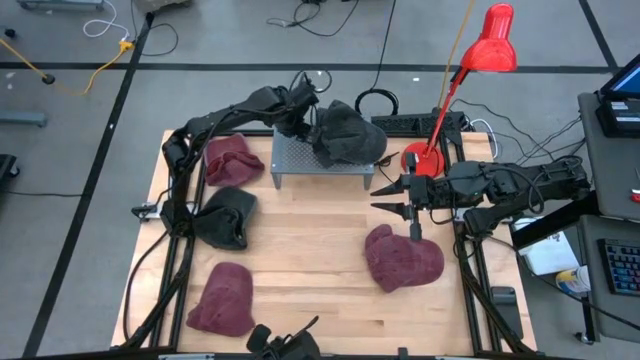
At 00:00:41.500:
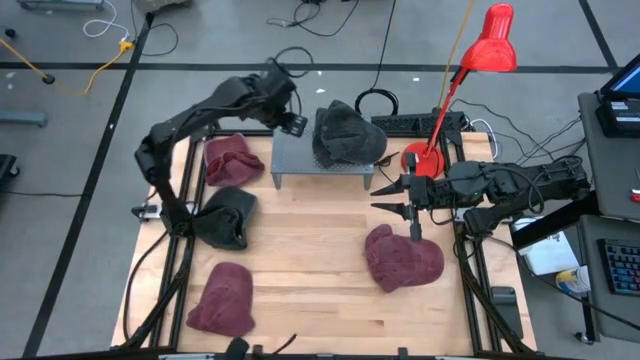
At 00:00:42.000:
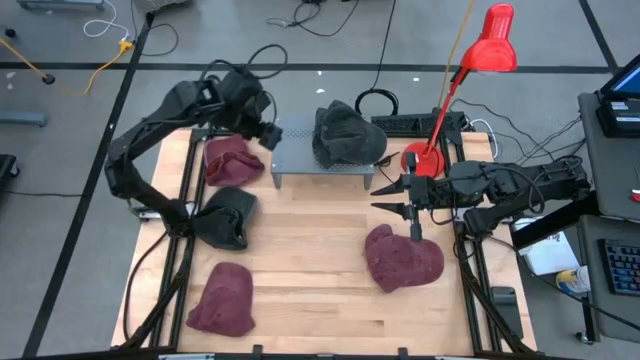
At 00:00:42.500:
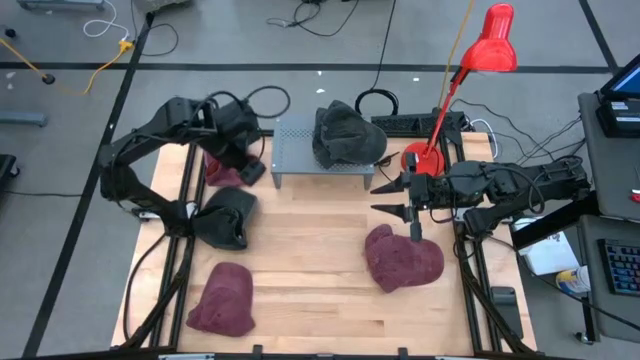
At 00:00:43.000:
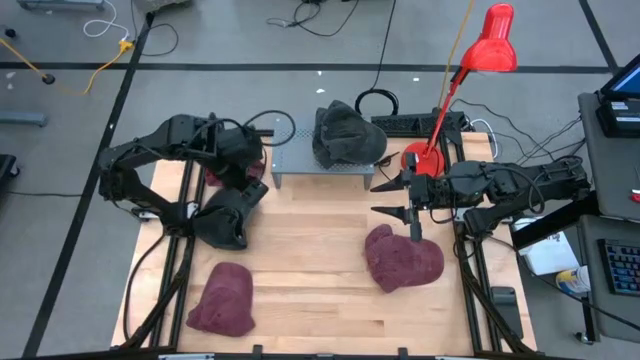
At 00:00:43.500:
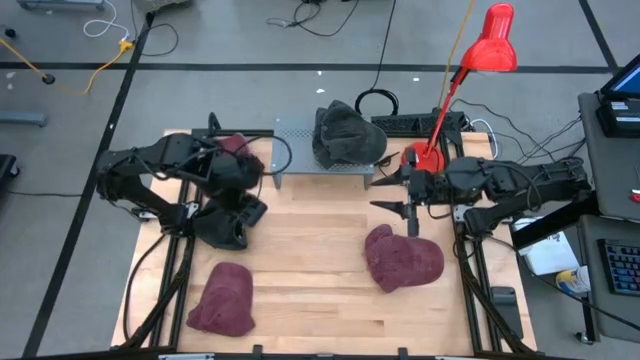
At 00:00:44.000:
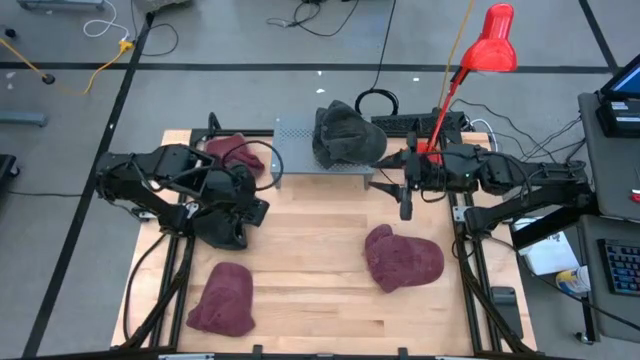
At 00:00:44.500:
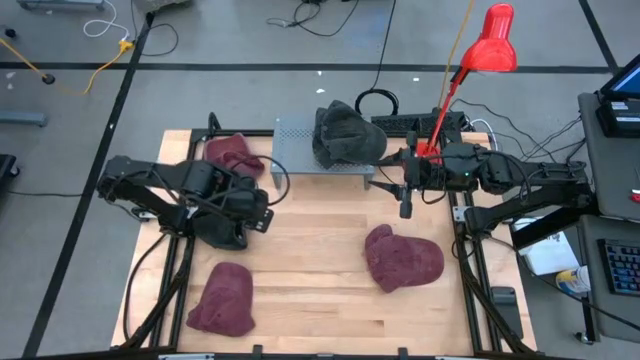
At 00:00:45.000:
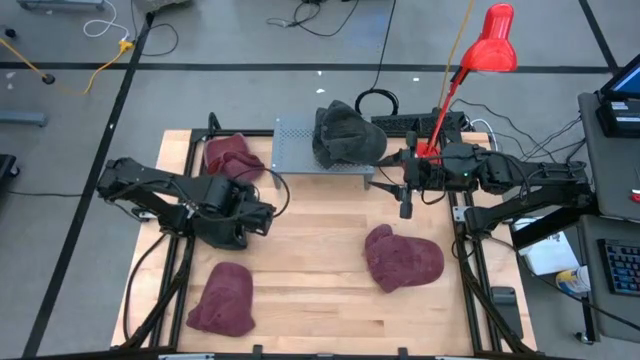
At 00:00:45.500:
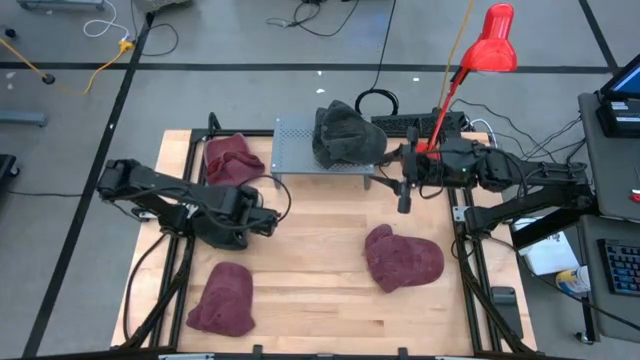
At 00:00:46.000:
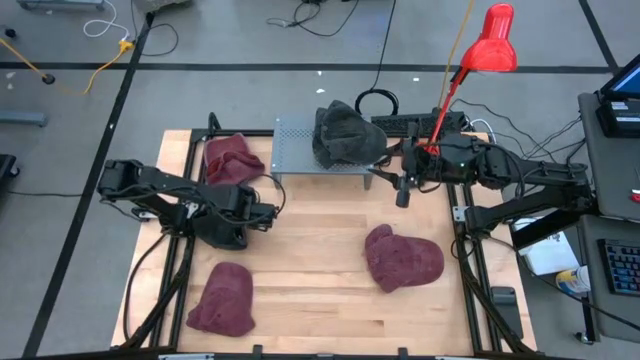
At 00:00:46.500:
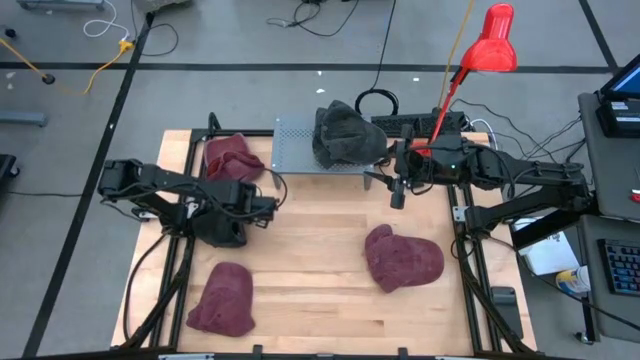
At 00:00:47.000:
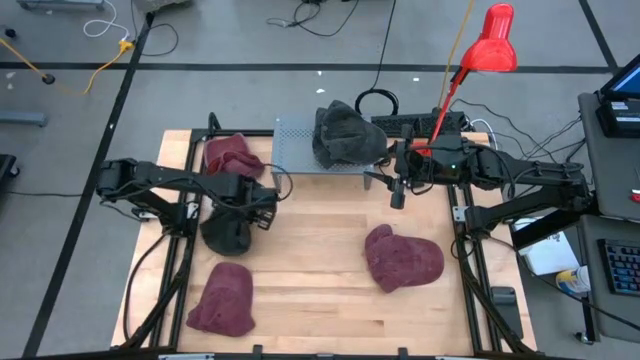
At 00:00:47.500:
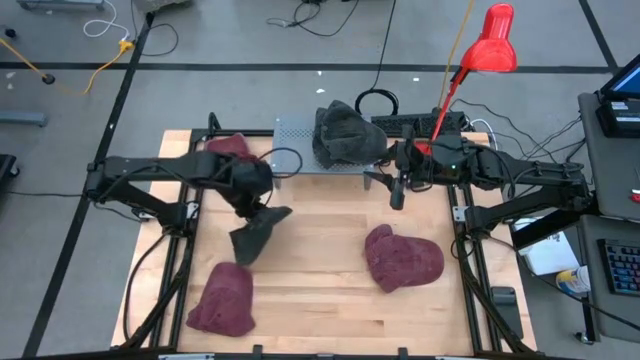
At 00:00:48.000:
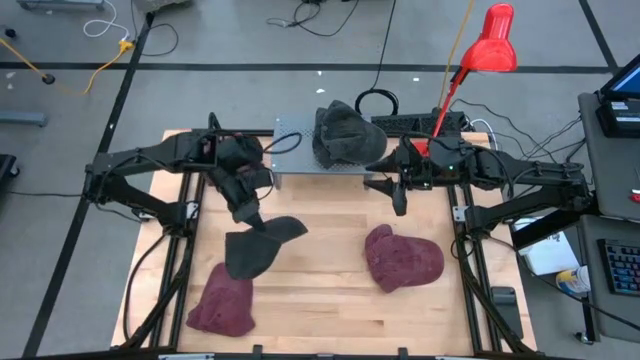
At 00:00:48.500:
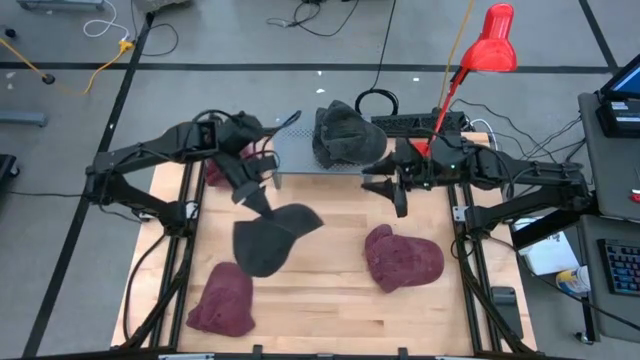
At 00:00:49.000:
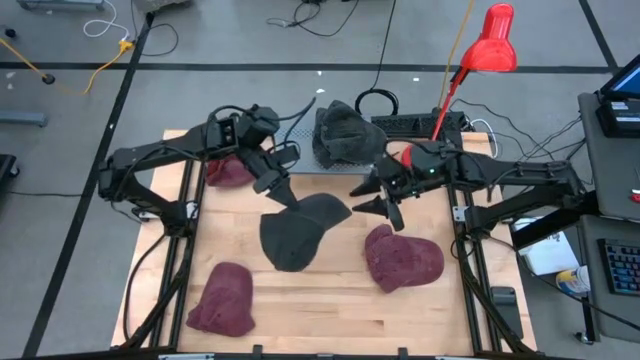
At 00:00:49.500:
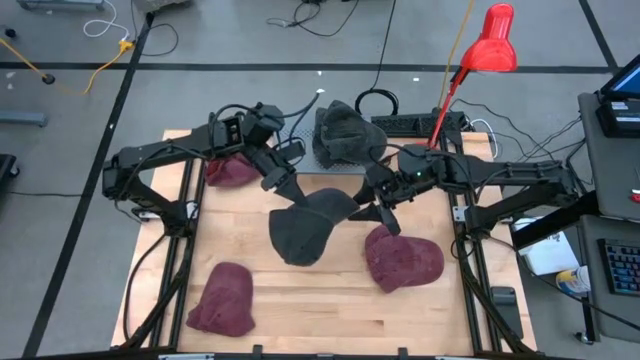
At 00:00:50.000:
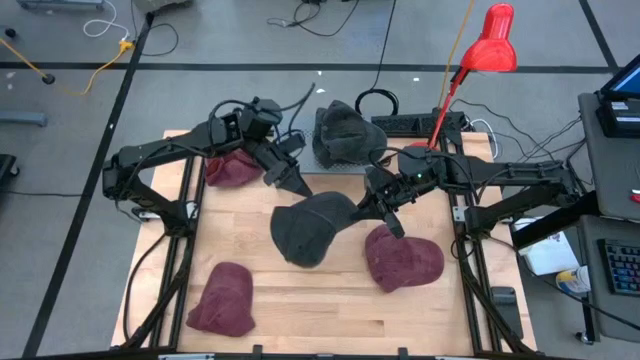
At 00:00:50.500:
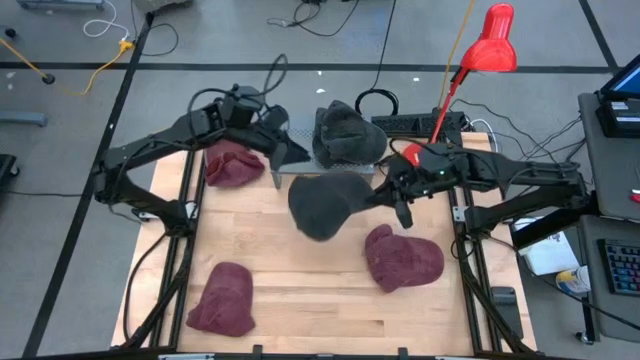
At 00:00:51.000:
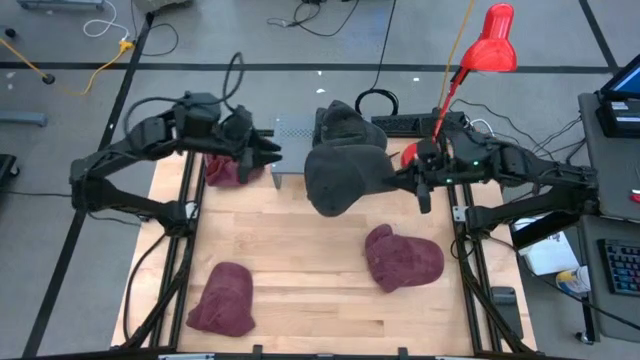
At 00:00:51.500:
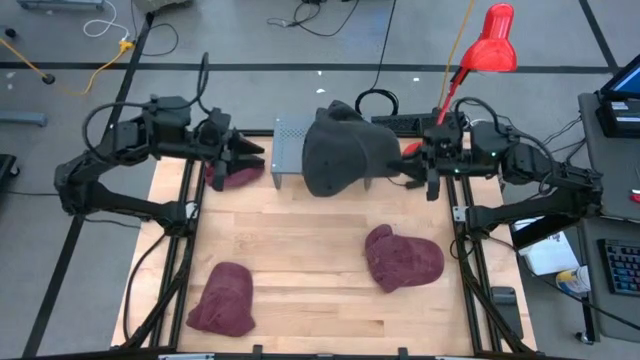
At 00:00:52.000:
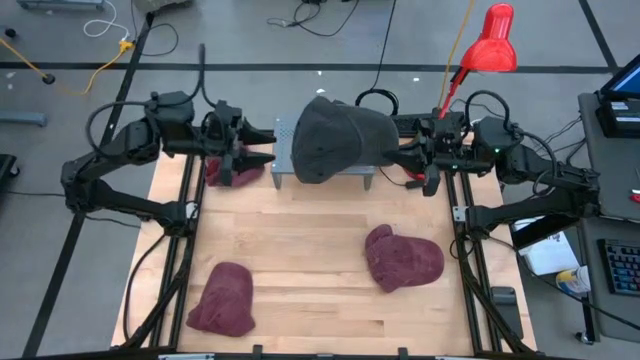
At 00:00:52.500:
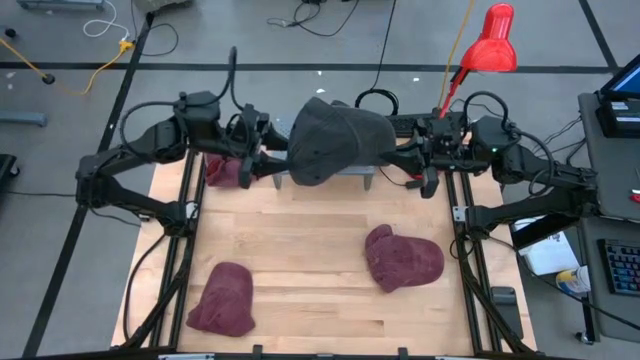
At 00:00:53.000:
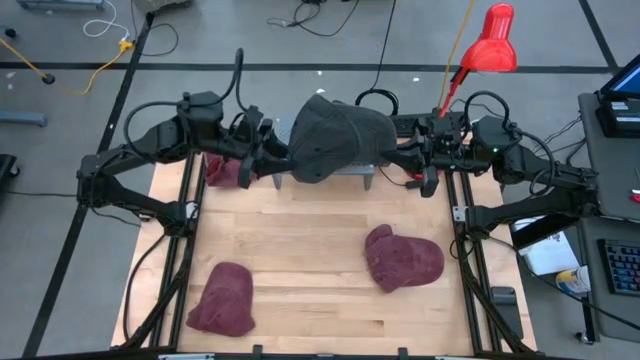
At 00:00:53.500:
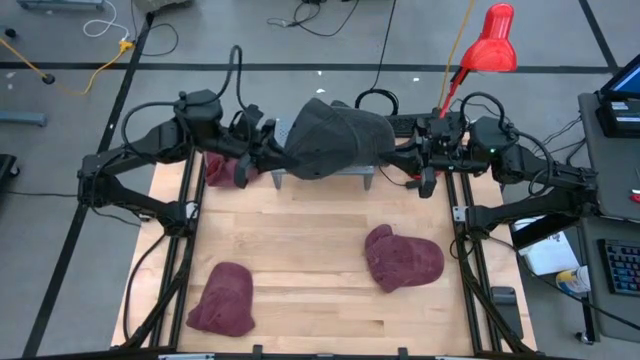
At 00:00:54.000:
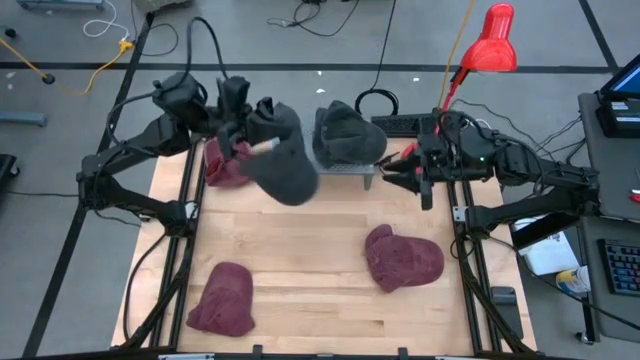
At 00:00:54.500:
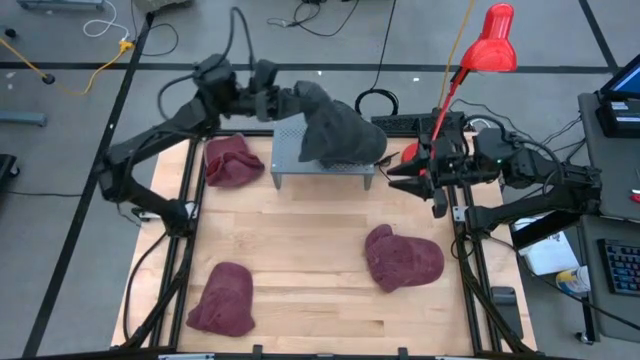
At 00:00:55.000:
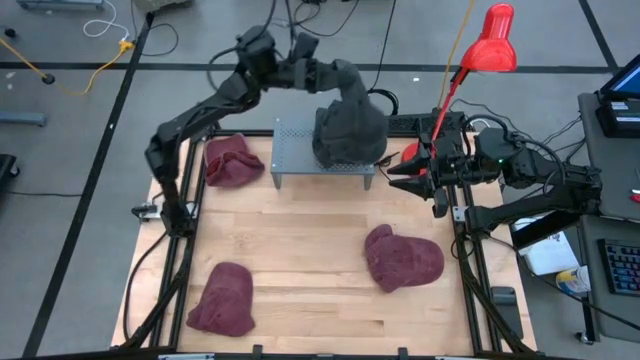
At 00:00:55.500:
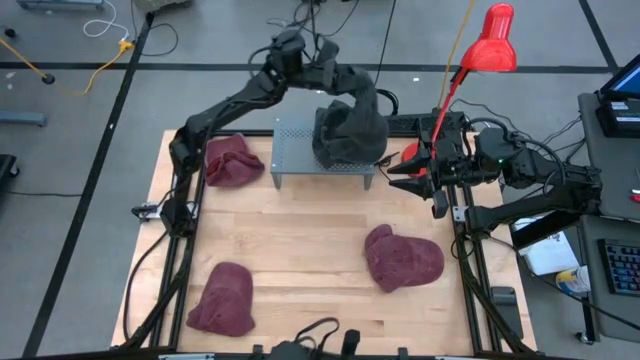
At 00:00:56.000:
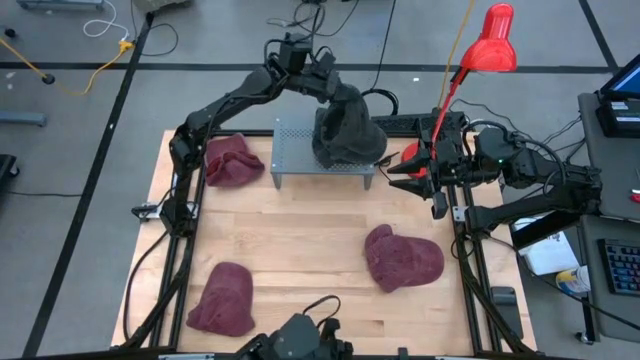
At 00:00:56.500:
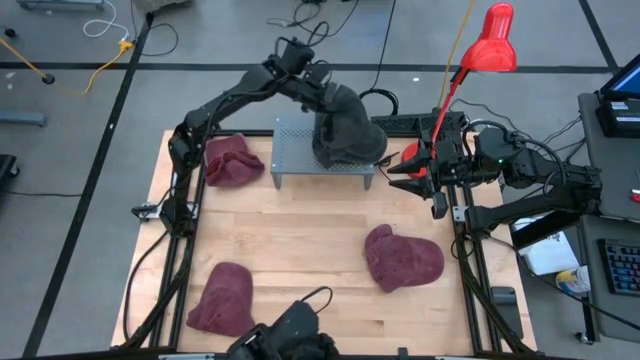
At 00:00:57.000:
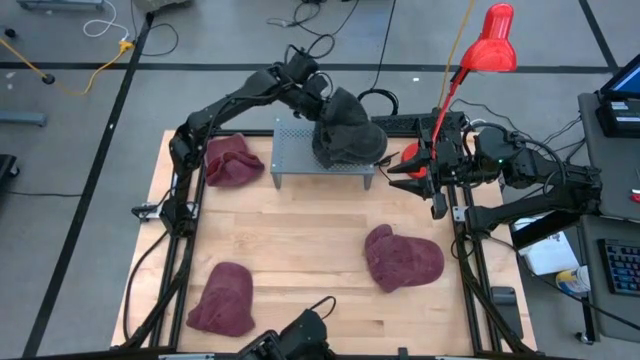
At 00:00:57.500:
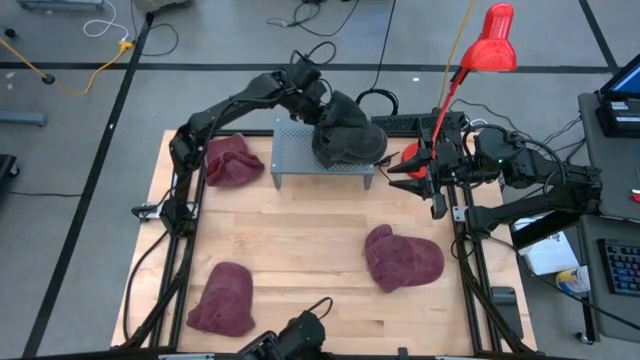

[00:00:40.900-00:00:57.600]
Task: Pick & Place hat
Stack the right black cap on the black cap on the shelf

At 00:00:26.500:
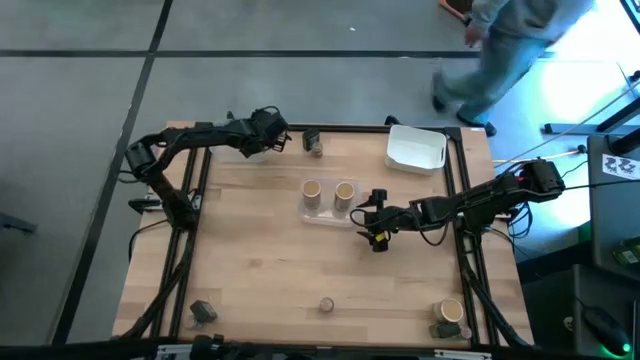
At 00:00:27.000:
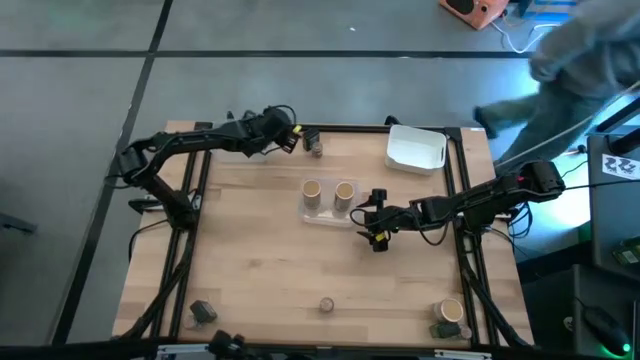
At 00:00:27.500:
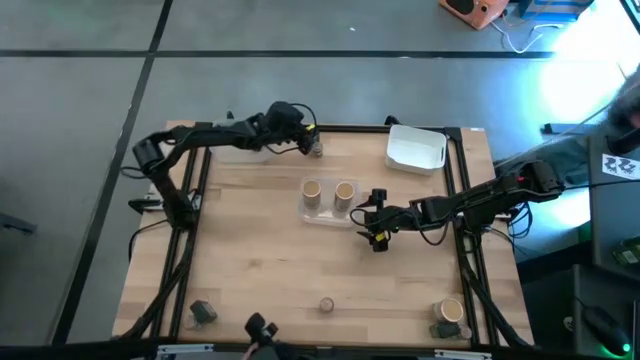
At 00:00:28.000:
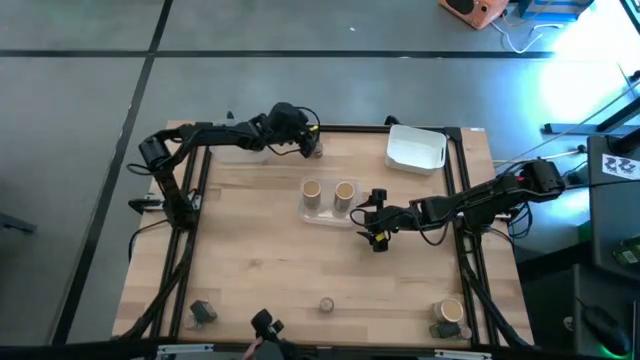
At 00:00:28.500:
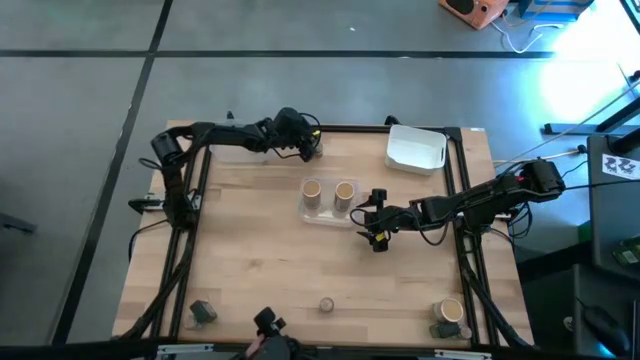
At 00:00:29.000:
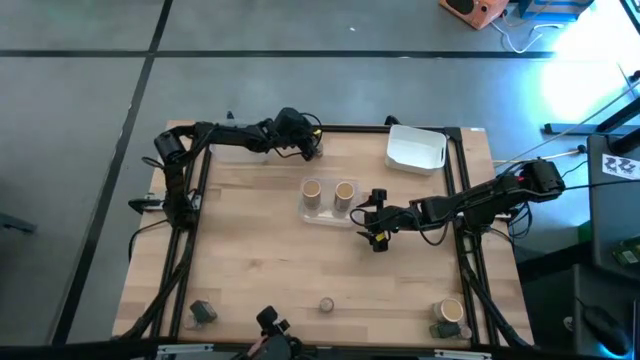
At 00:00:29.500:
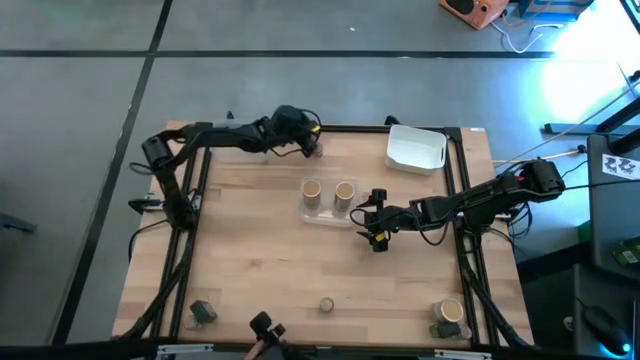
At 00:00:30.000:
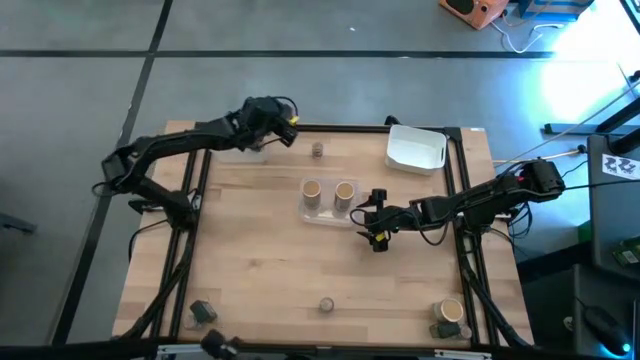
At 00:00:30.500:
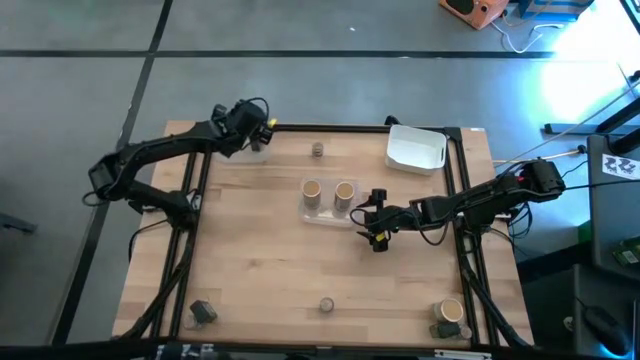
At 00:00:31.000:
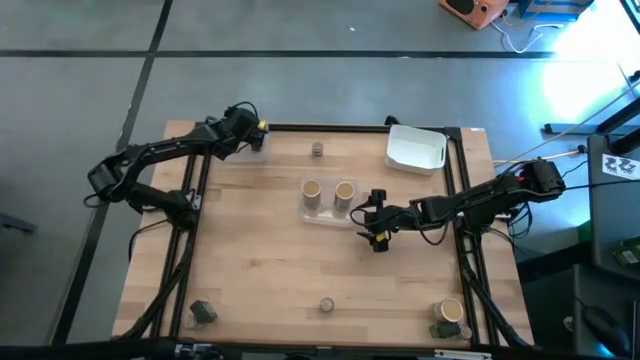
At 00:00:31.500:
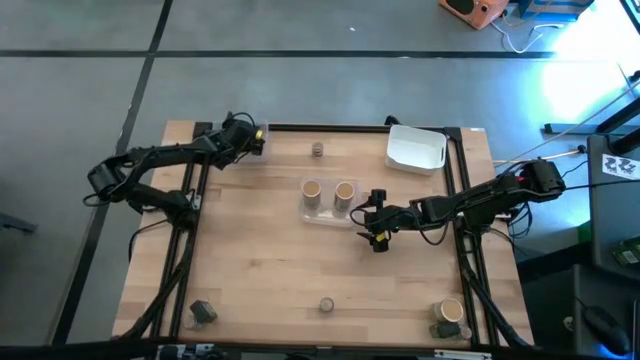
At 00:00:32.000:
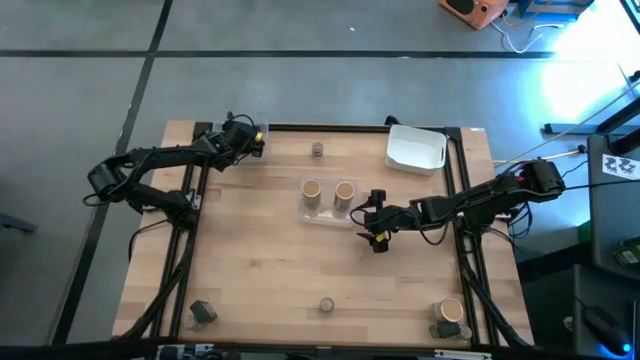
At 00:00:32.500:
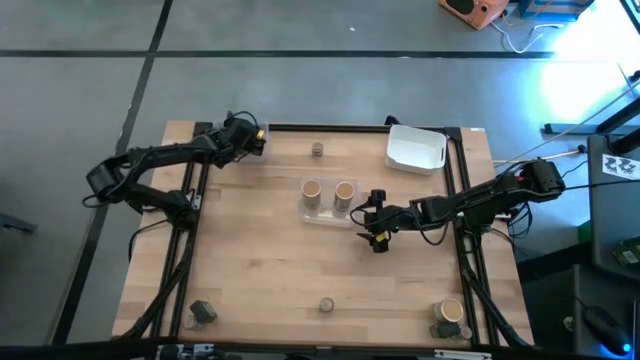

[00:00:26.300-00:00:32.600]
Task: Sort spices by type
Put the black seasoning can into the top transparent bin
